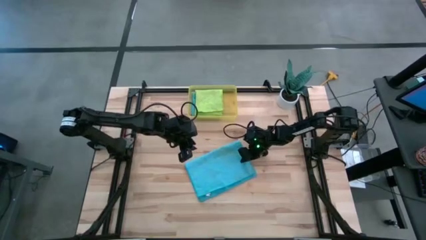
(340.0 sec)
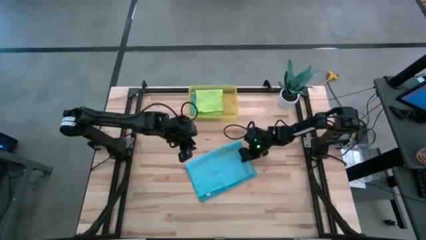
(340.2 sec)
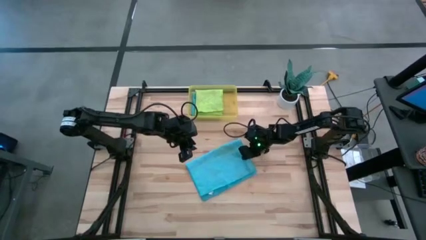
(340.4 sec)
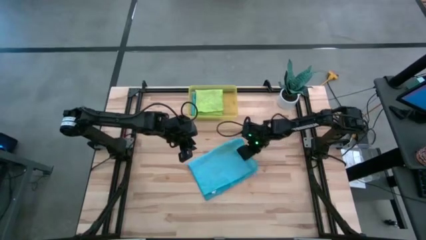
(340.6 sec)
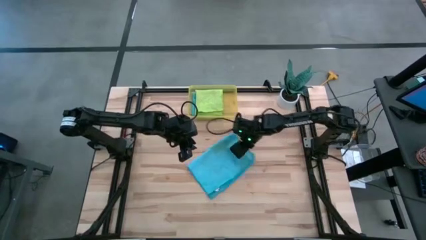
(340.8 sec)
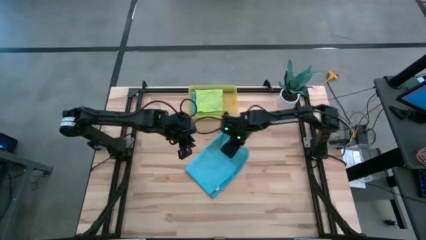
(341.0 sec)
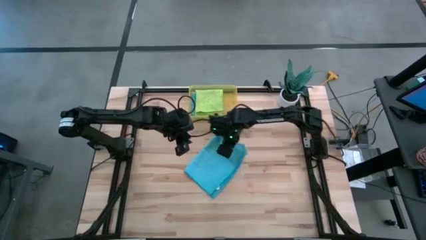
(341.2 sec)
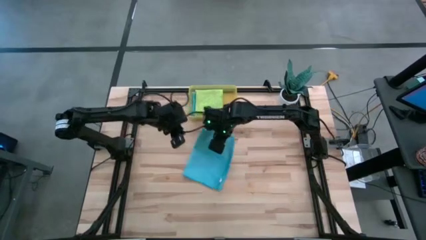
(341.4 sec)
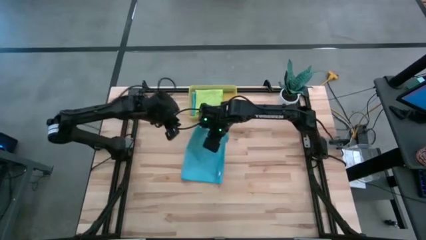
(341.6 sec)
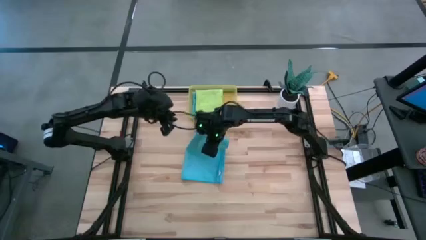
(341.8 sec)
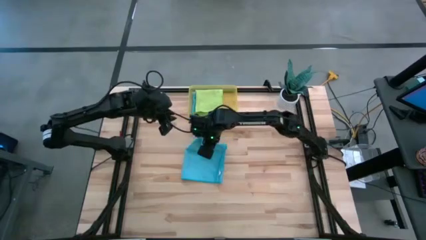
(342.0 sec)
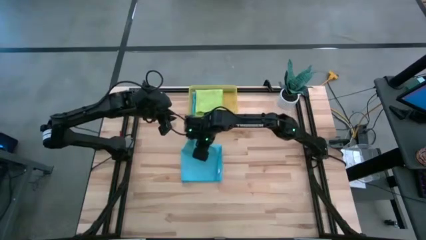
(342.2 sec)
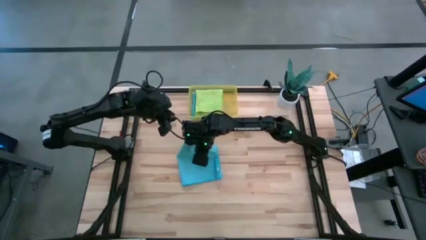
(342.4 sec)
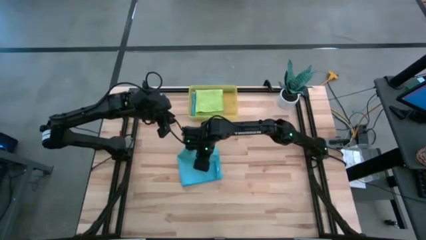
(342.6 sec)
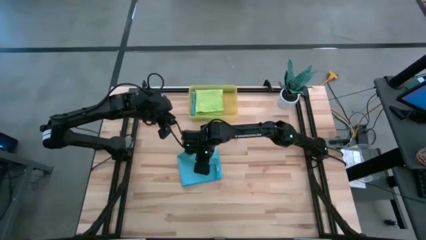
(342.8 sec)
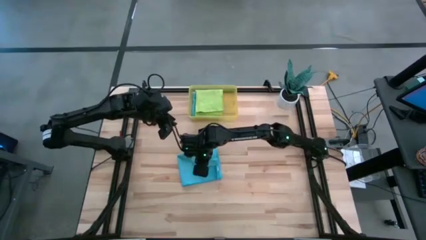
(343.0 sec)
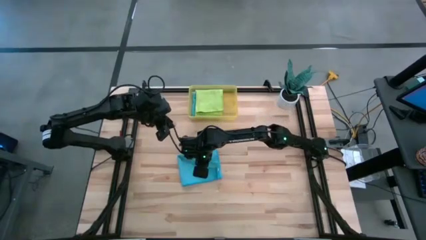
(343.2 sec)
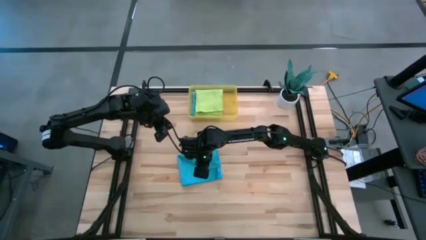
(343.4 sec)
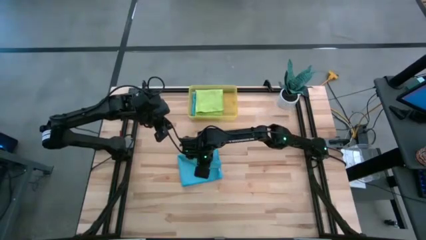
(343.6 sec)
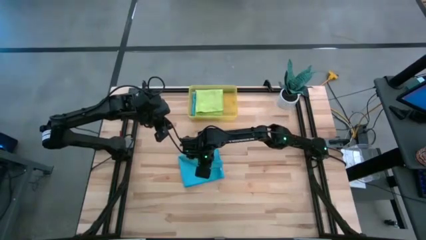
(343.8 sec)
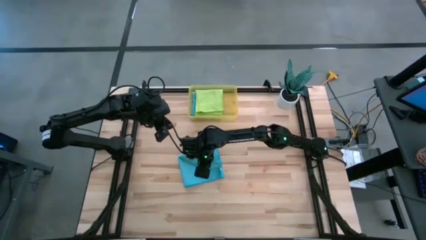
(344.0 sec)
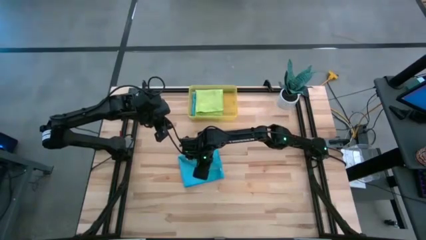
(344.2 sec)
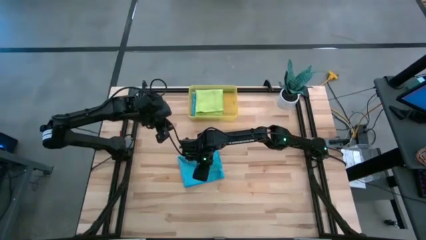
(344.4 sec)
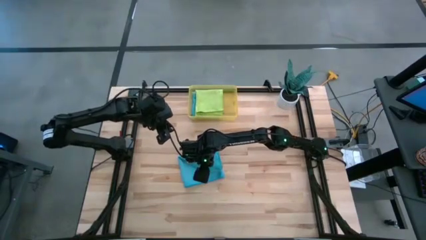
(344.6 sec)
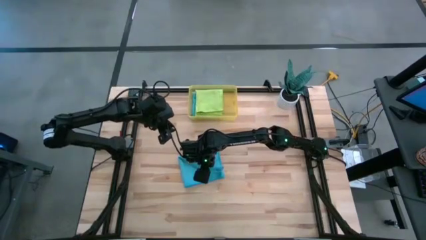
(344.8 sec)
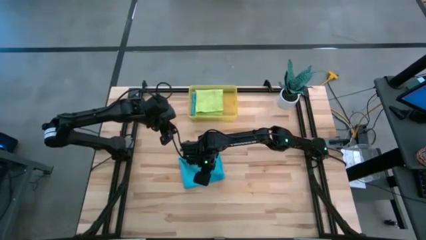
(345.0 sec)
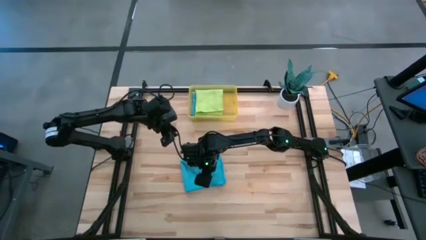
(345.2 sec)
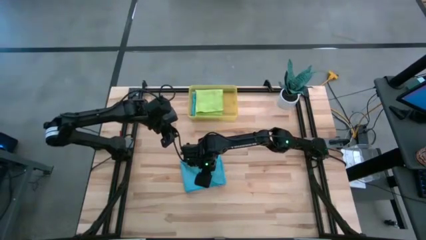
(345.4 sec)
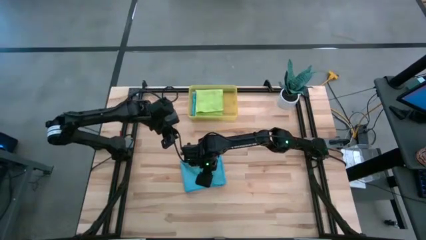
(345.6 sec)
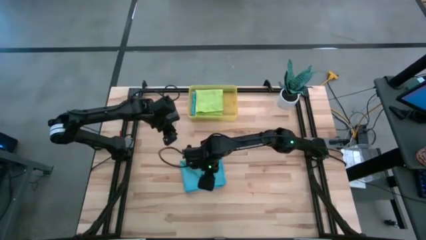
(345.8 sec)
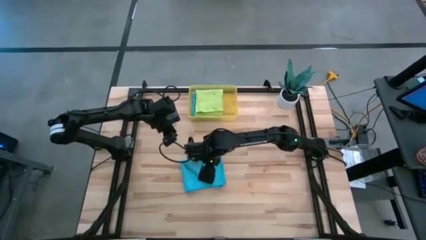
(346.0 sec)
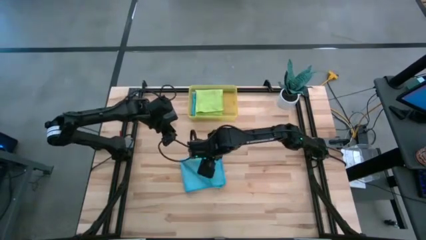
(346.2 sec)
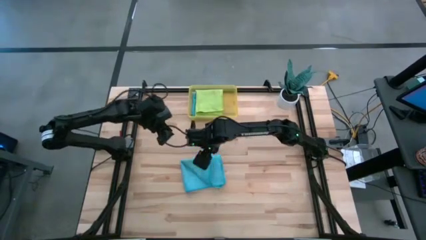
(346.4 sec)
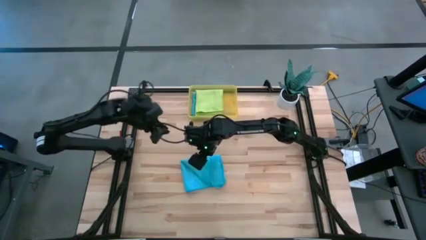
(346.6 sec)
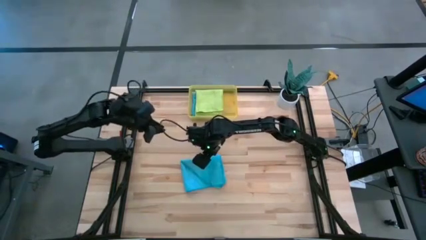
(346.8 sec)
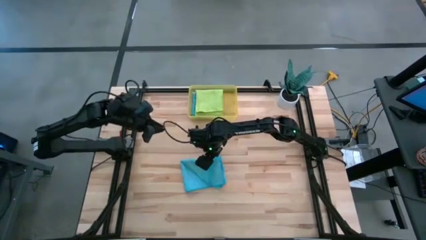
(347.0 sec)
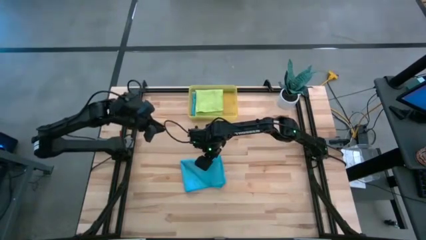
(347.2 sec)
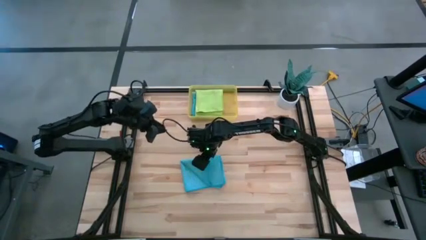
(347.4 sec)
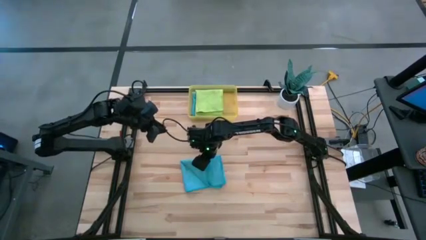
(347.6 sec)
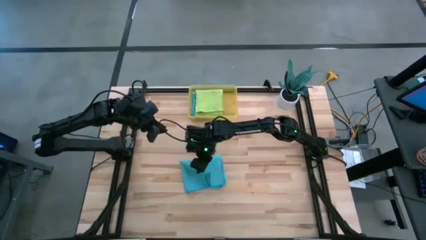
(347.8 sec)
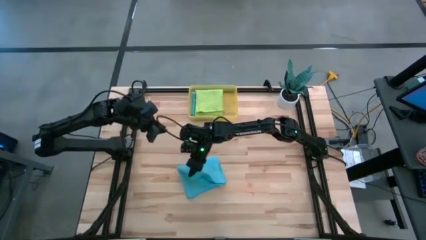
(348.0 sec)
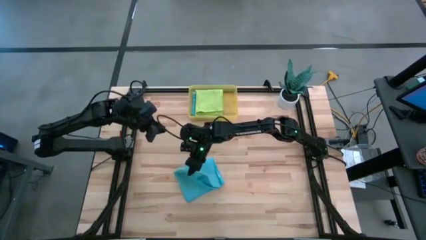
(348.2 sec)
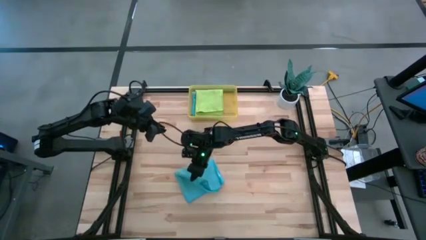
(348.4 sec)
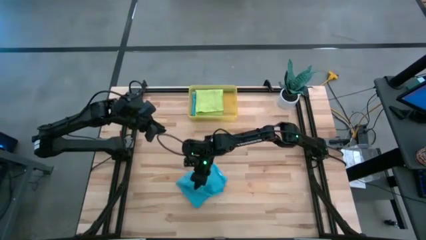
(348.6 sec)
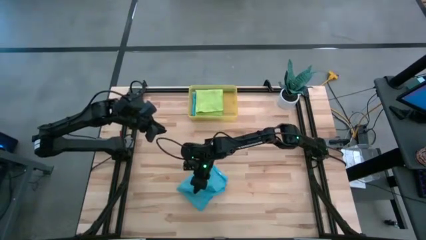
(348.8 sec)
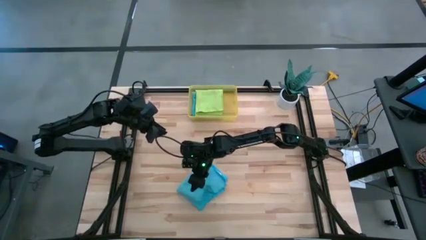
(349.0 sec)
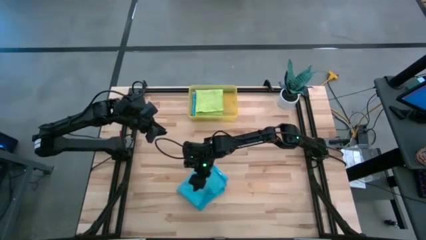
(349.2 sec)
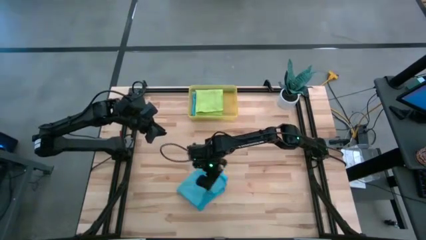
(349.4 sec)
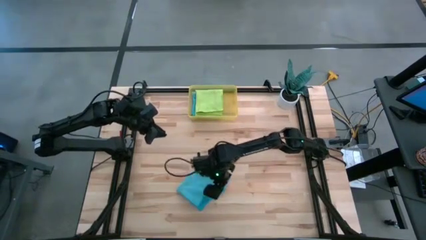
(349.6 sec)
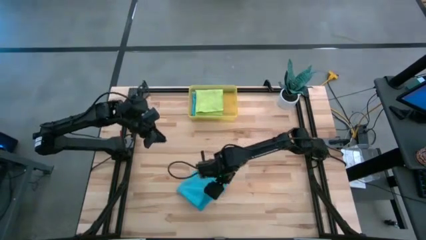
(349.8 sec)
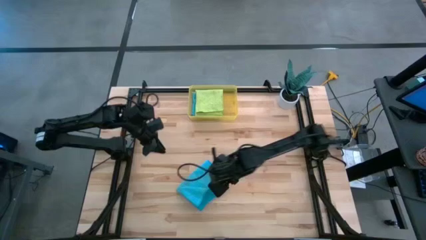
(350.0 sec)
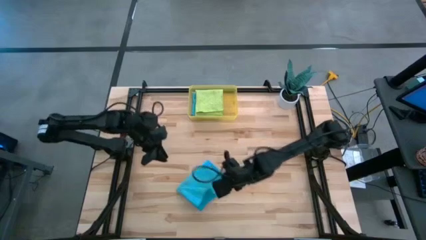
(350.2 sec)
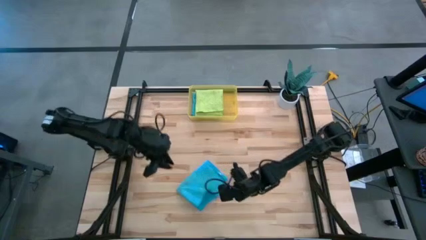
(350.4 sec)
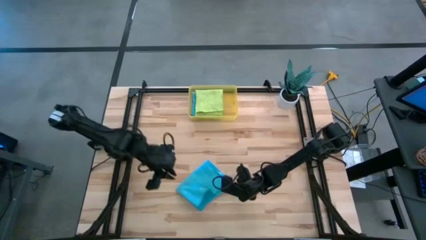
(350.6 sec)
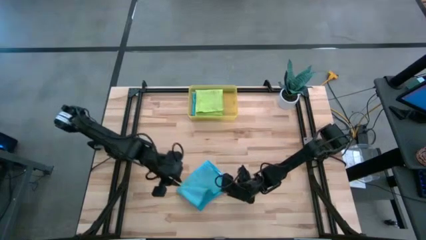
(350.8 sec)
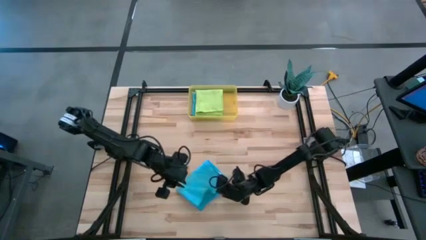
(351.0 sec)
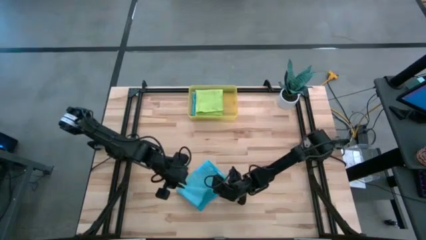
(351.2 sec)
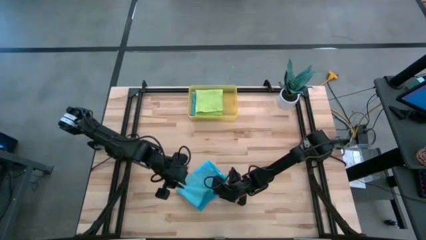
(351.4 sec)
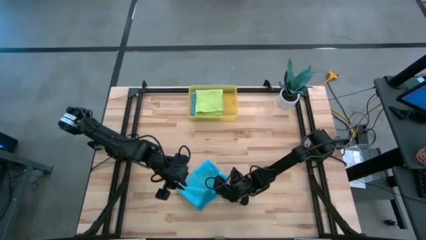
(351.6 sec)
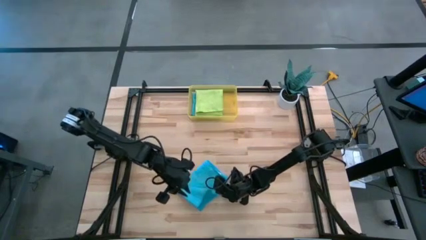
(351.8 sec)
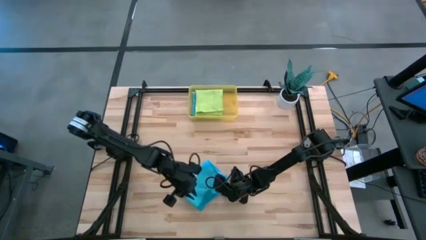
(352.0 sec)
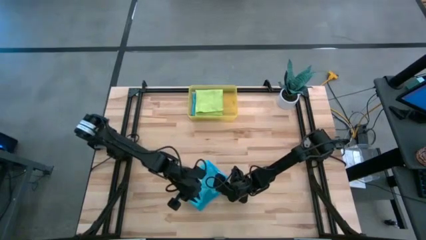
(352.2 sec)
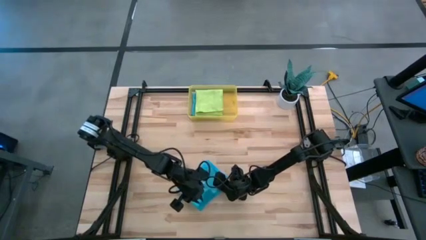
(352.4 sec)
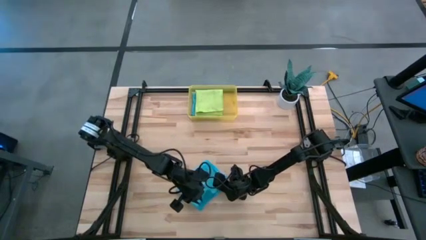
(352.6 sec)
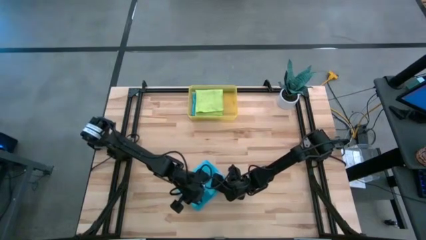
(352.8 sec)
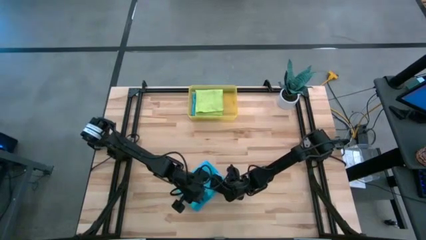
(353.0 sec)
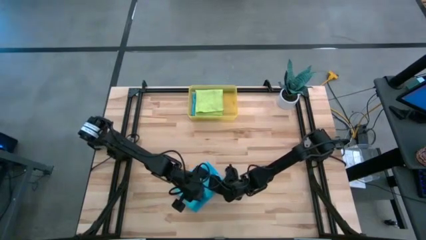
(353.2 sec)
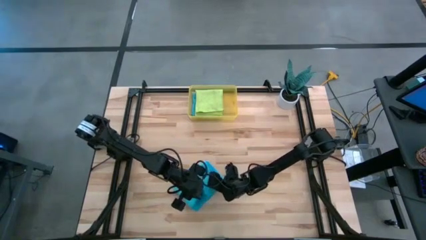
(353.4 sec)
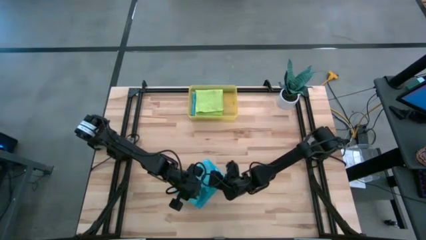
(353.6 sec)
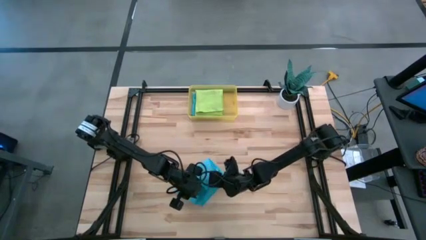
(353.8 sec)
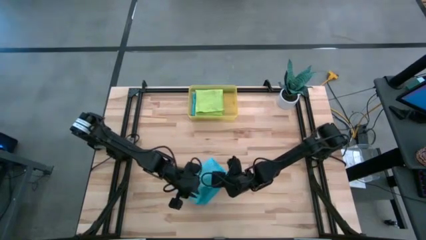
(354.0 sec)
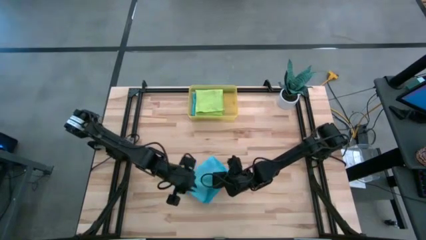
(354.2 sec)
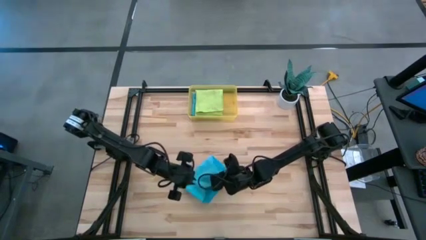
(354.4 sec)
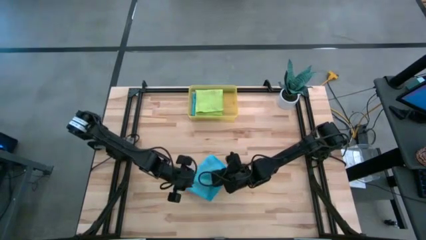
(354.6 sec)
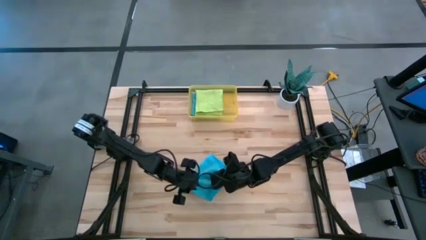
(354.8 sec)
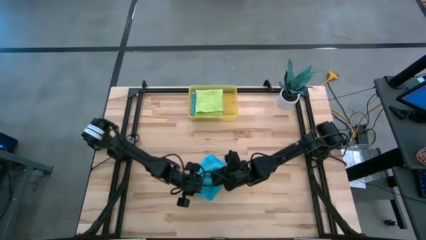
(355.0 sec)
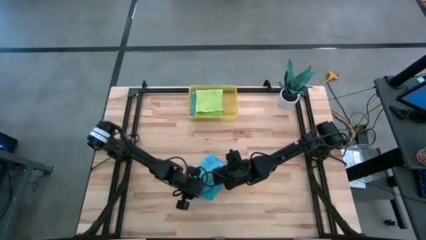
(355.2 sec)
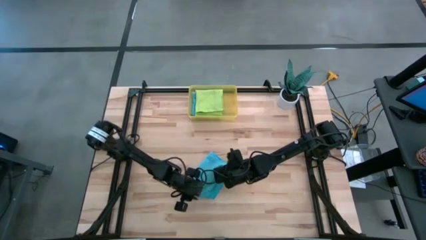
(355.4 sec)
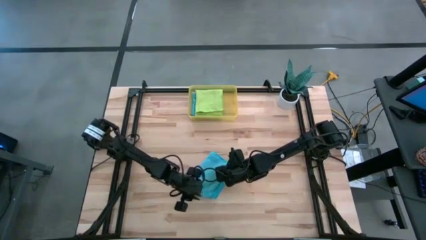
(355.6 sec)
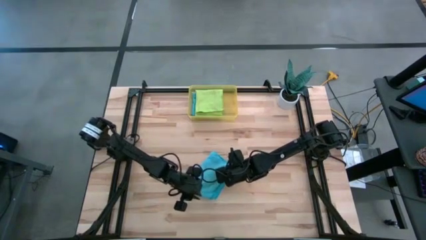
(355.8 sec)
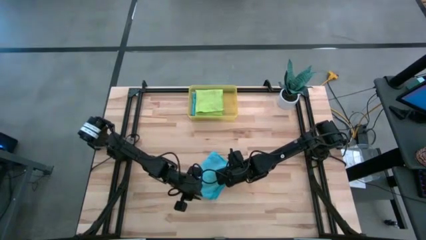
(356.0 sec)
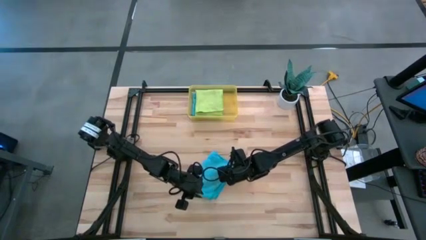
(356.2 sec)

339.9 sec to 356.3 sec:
Task: Fold microfiber towels
Fold the blue microfiber cloth

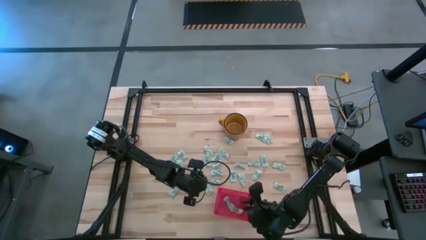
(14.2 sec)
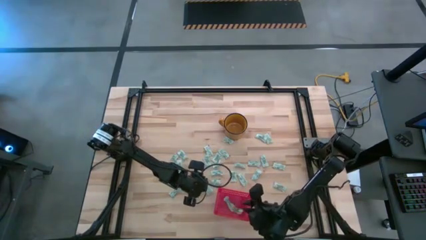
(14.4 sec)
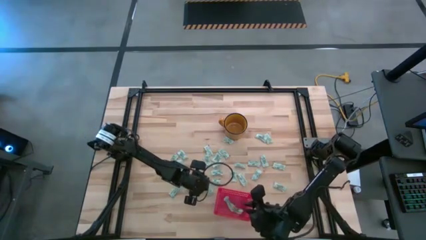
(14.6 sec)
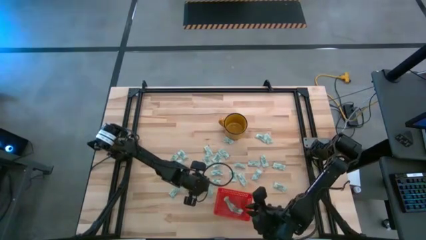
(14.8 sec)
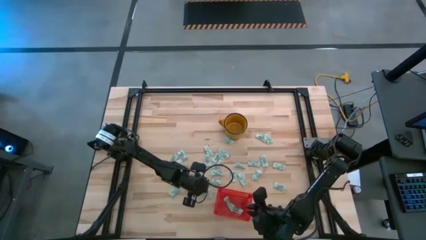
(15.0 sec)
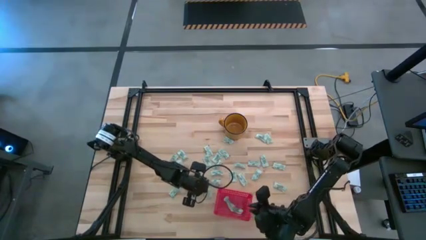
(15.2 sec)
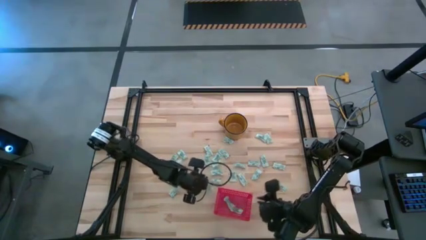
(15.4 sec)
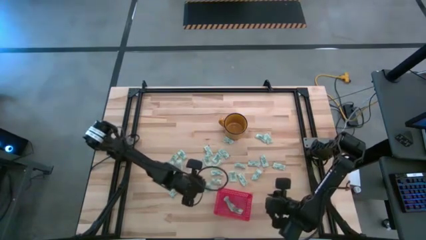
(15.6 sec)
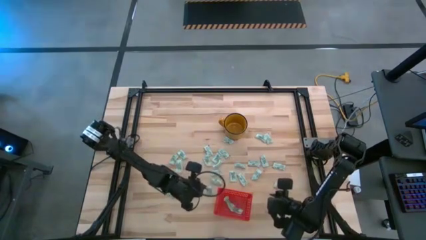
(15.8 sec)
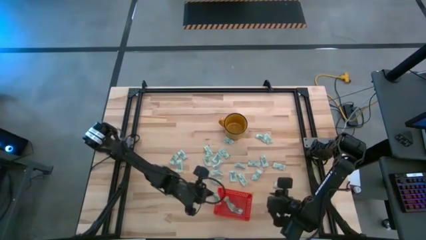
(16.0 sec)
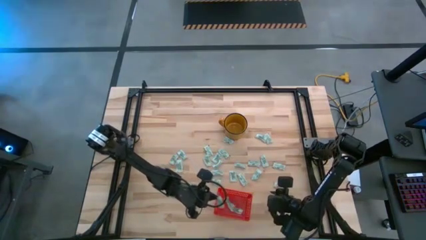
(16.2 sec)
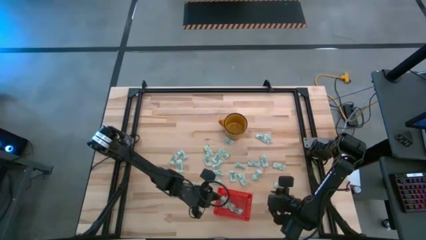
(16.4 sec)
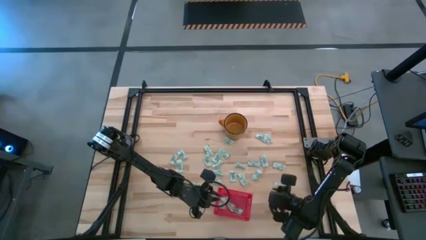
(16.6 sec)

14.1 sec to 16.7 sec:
Task: Pick and place Stevia / Truvia into bins
Put the stevia packet into the bin
